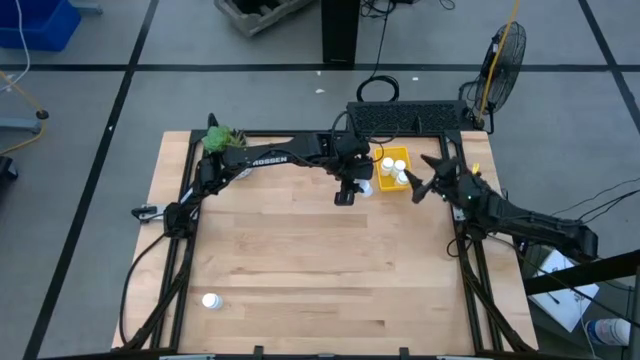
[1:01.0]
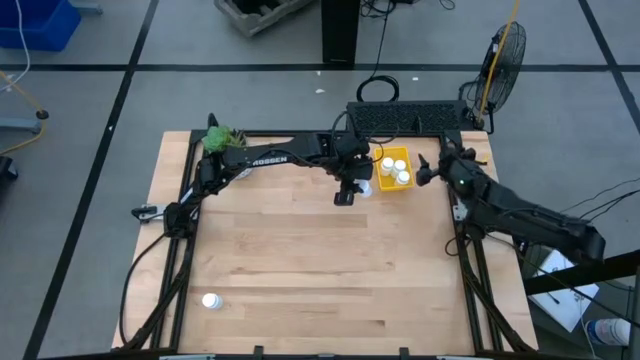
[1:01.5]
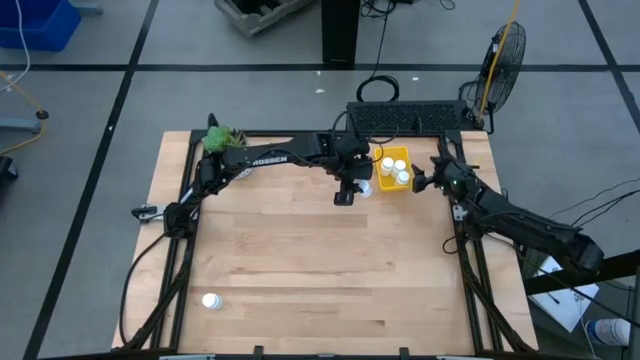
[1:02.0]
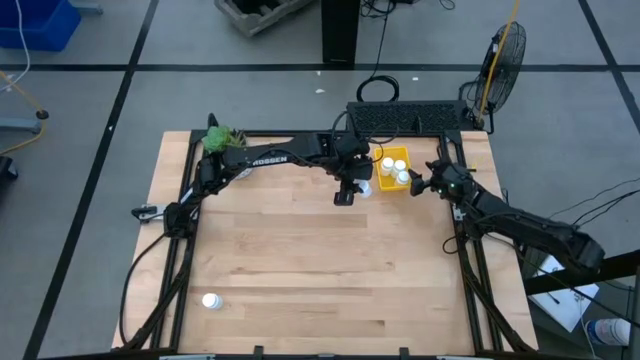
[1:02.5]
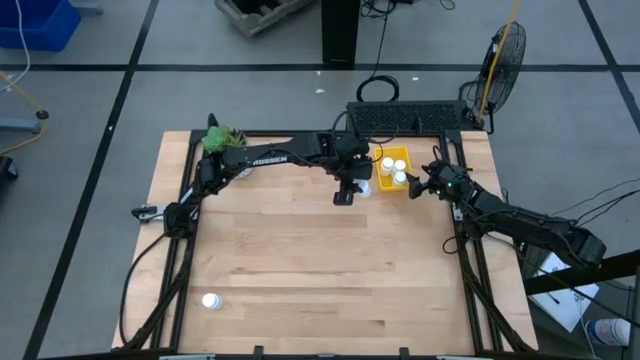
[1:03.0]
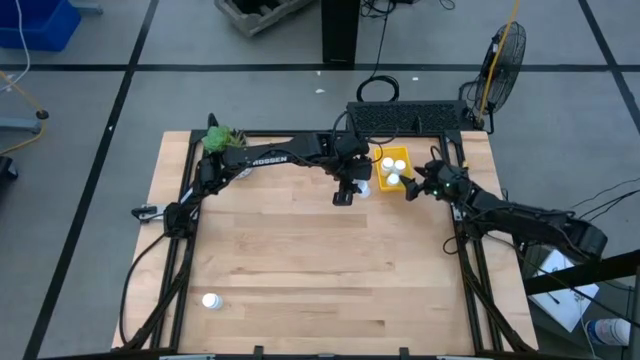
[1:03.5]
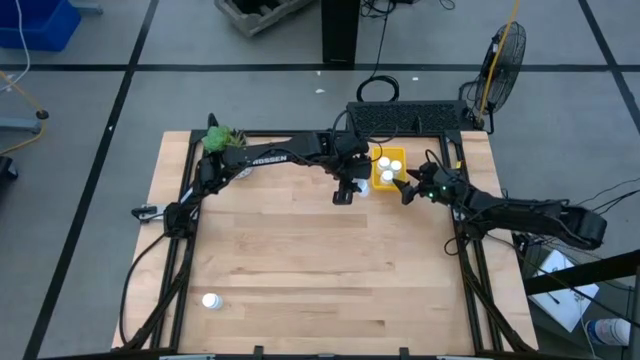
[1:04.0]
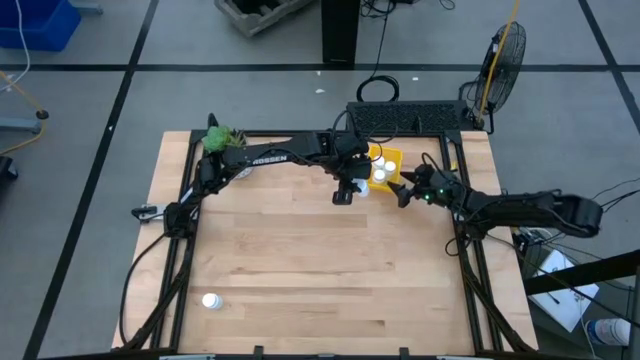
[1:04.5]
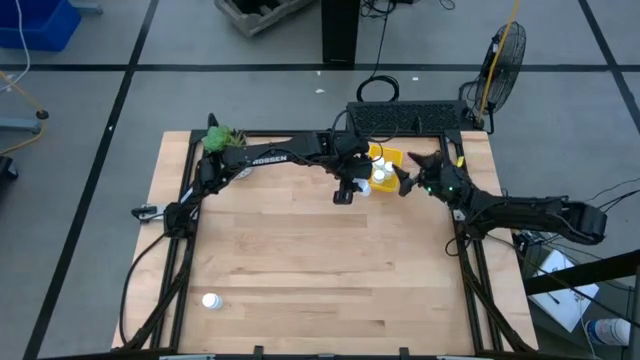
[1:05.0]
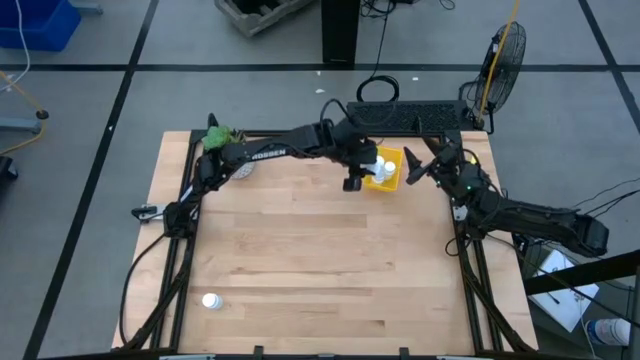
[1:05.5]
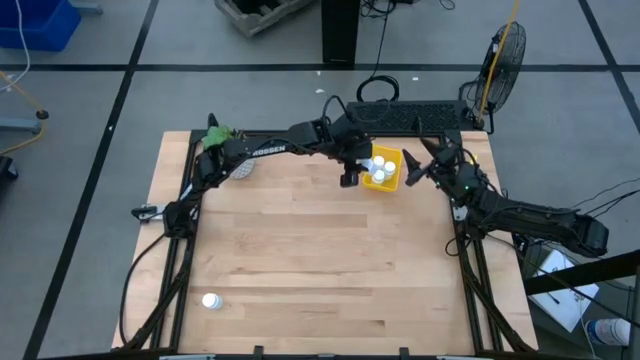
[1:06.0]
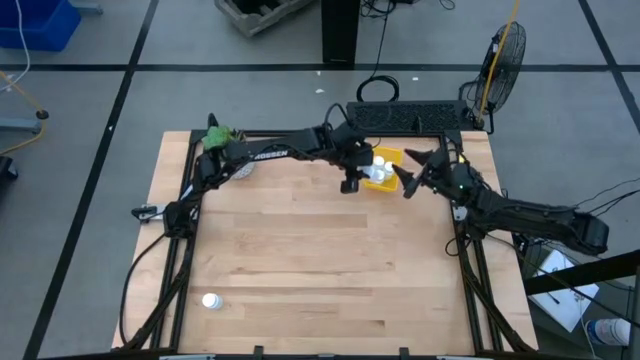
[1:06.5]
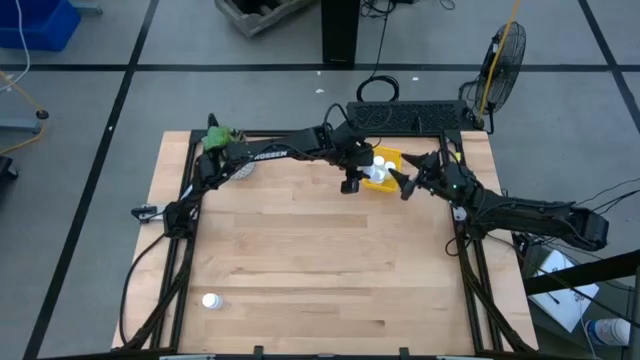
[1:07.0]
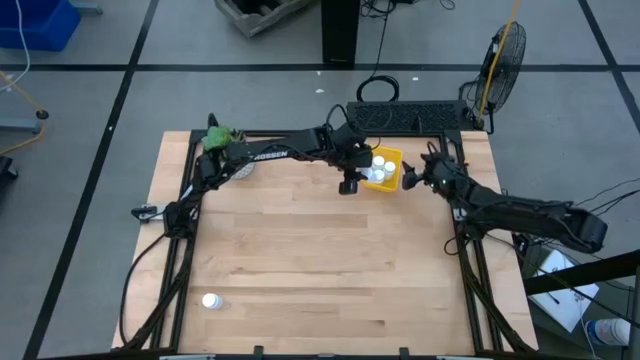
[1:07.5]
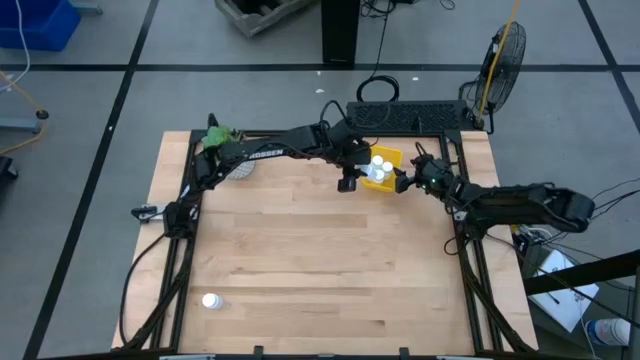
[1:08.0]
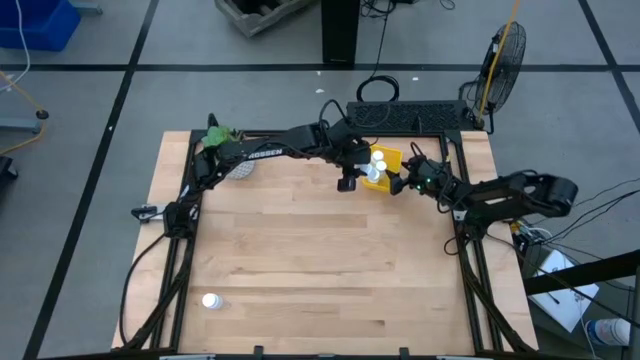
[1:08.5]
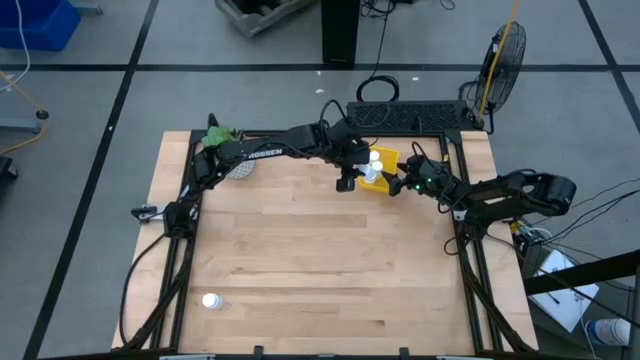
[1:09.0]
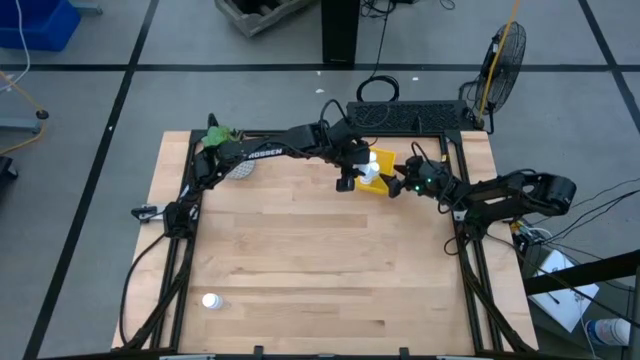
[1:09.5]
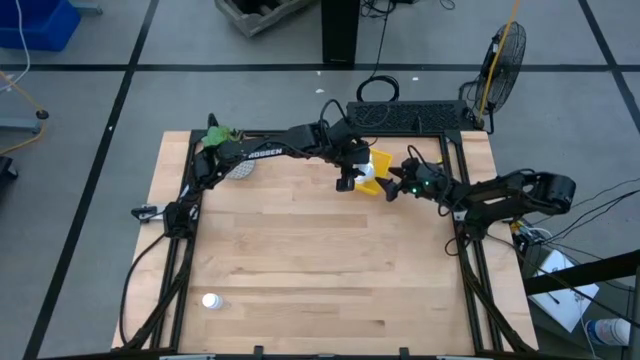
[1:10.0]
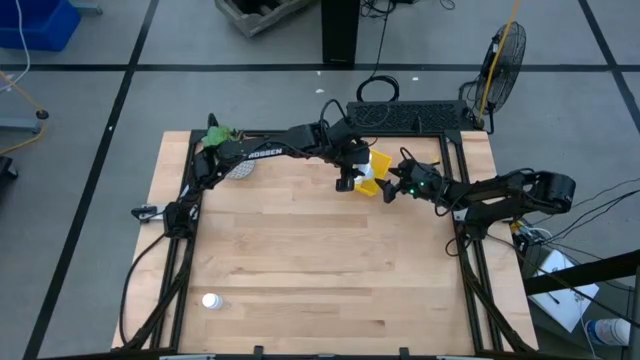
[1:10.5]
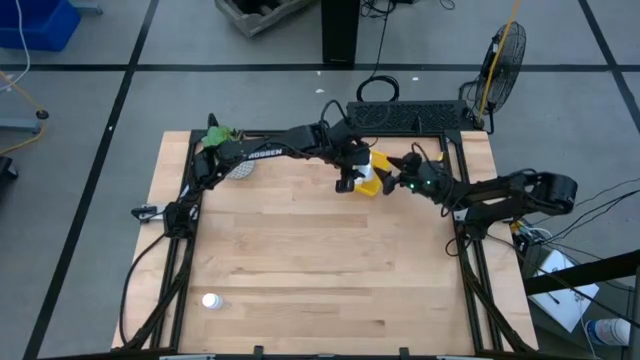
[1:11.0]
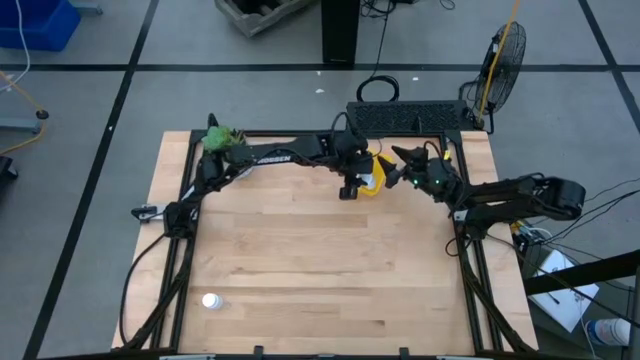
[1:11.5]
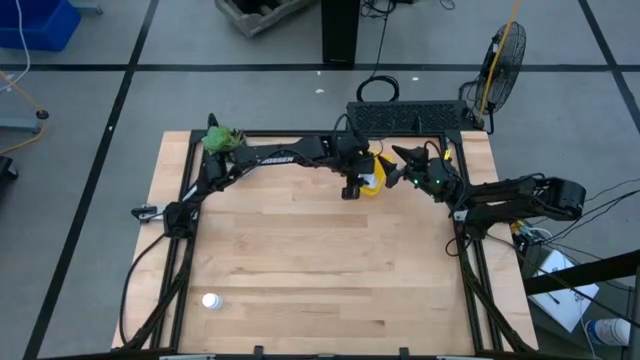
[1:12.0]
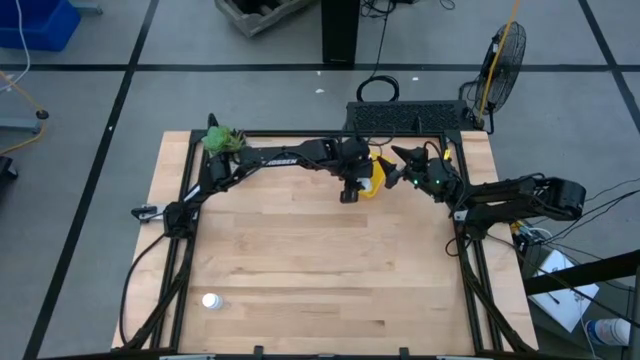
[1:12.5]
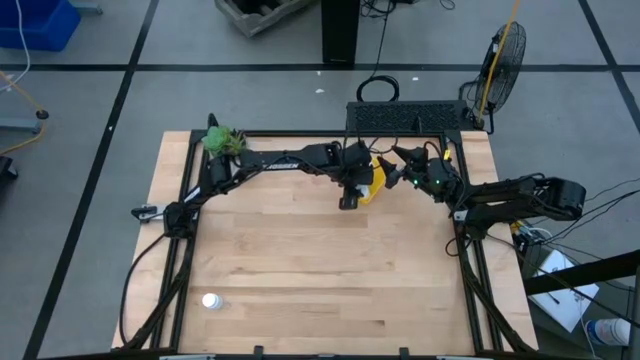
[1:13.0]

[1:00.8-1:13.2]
Task: Pick and place pill bottles into a basket
Put the top white medicine bottle into the yellow bin

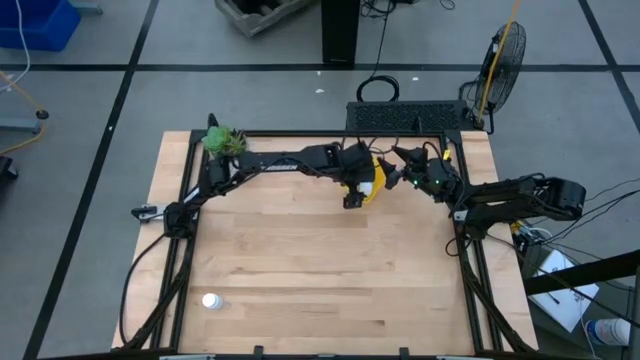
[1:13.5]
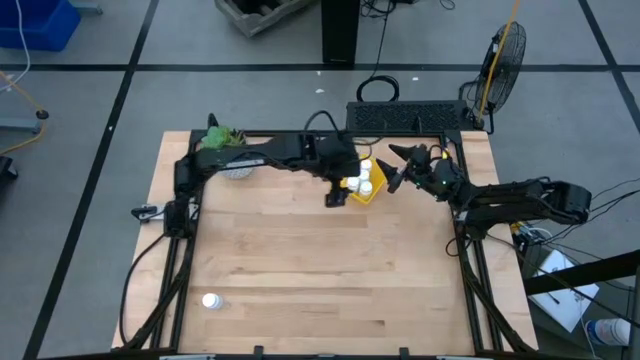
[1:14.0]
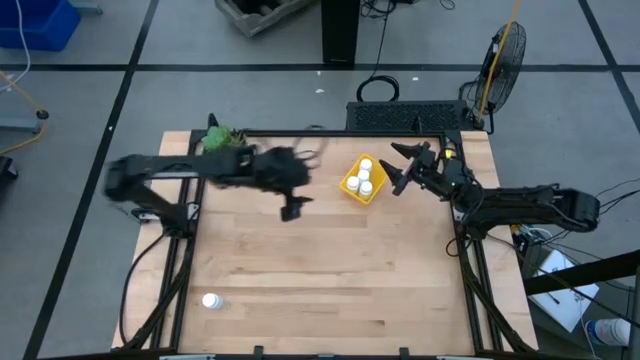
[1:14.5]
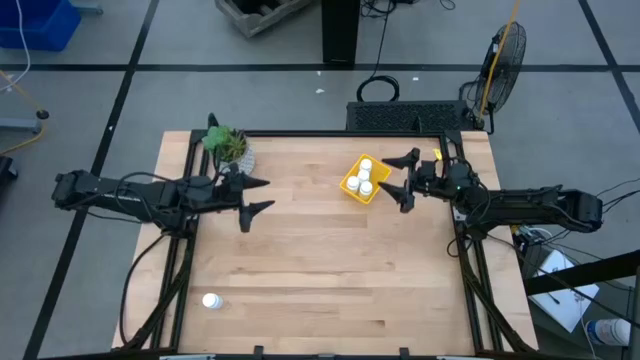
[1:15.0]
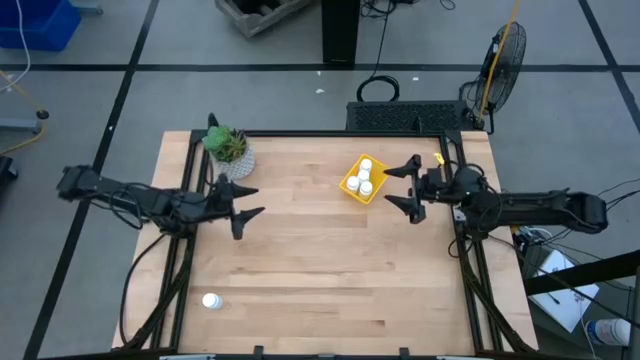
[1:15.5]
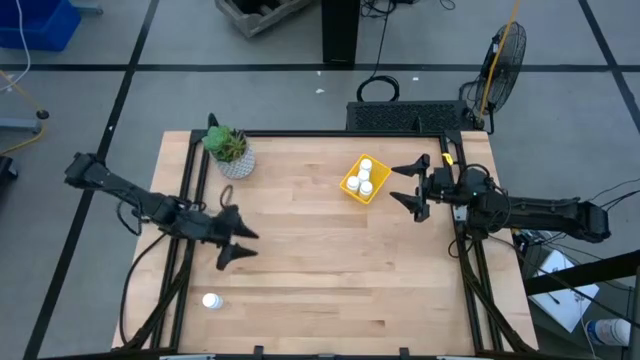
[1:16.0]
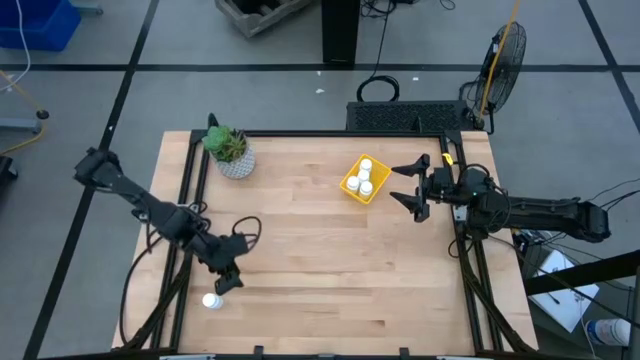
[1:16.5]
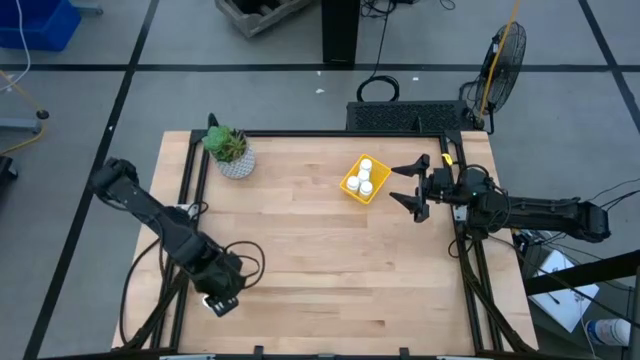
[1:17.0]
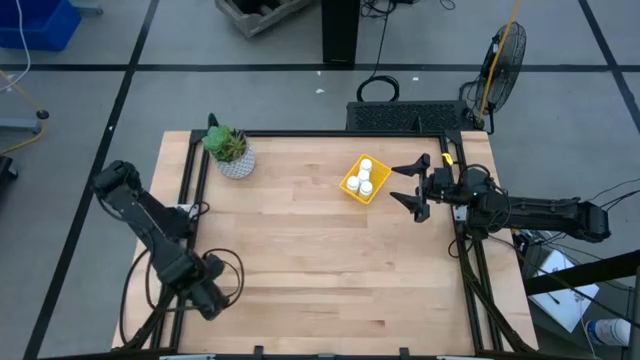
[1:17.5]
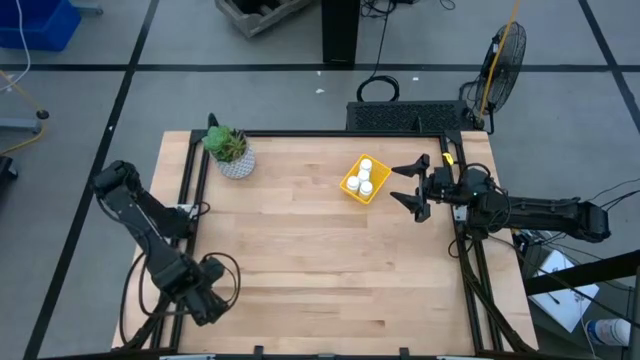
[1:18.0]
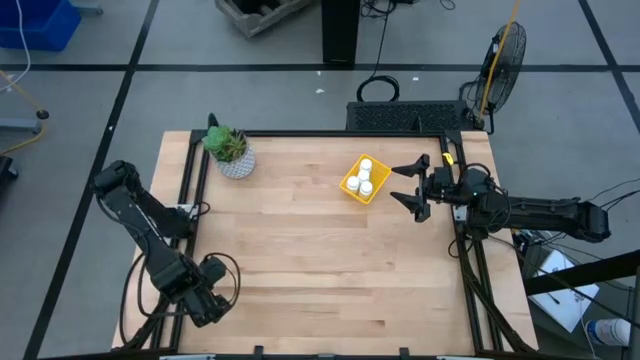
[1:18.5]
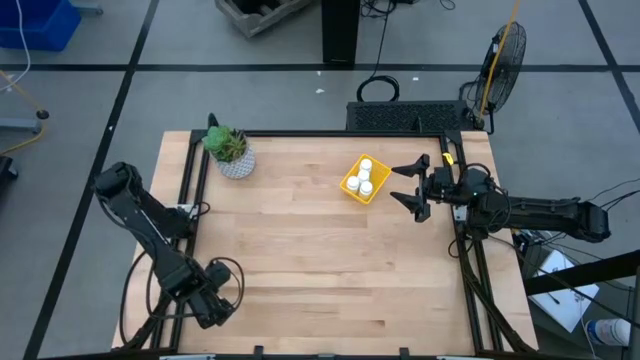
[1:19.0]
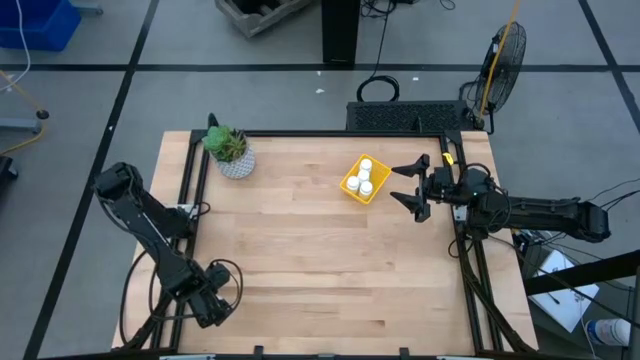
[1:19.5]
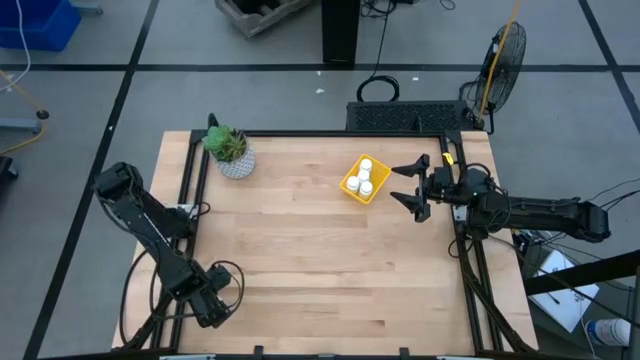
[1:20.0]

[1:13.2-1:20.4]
Put the white medicine bottle into the yellow bin

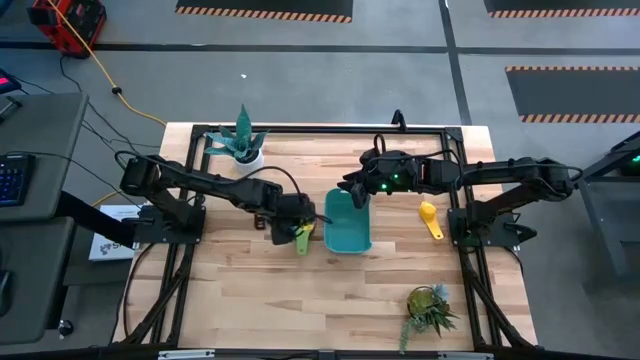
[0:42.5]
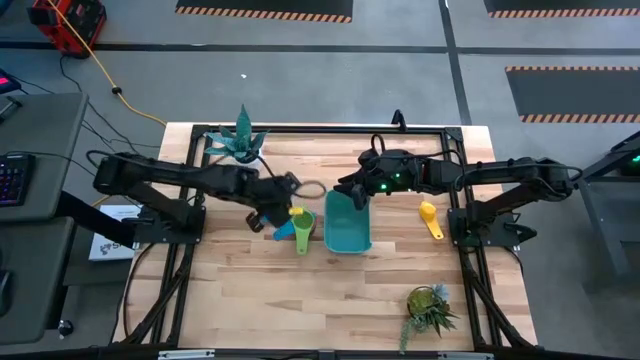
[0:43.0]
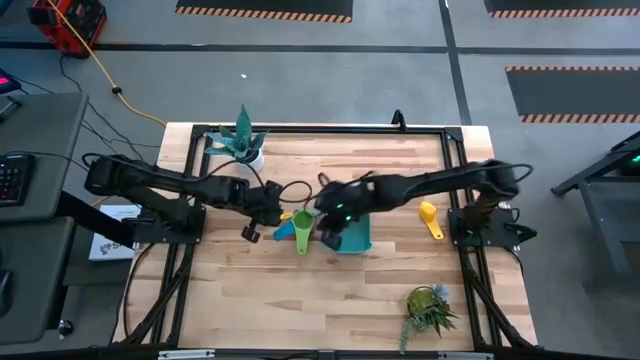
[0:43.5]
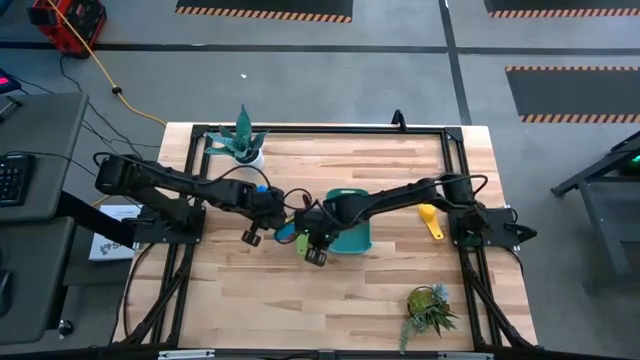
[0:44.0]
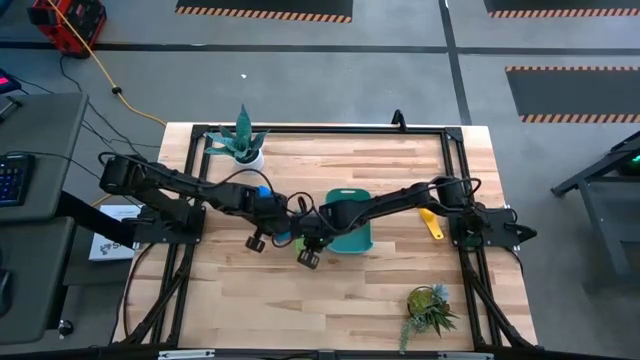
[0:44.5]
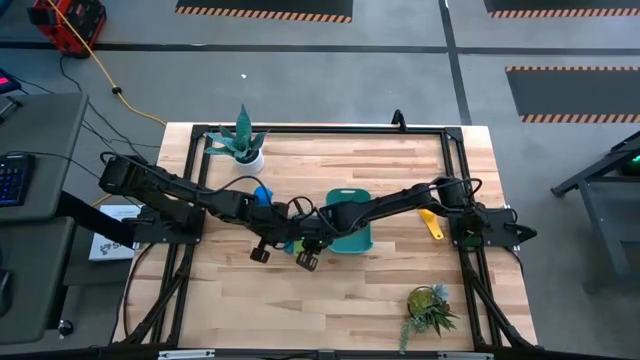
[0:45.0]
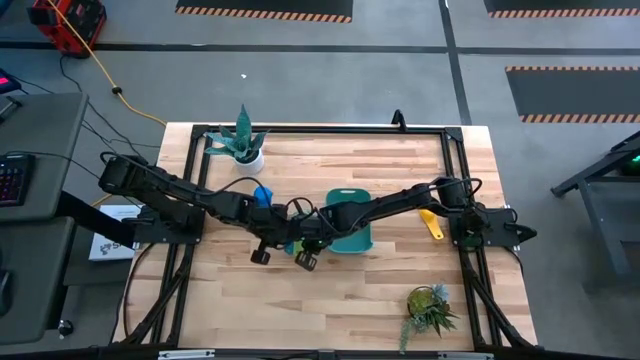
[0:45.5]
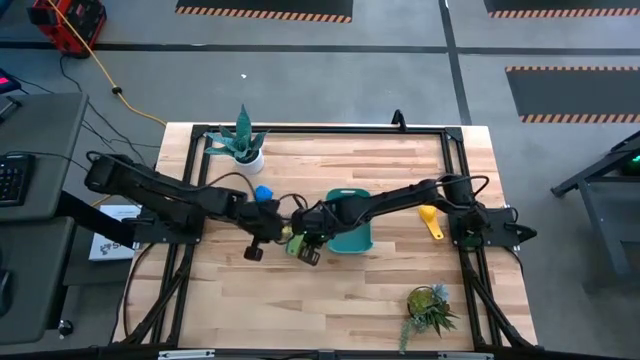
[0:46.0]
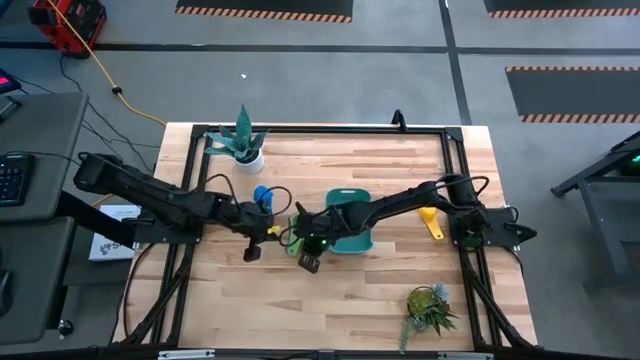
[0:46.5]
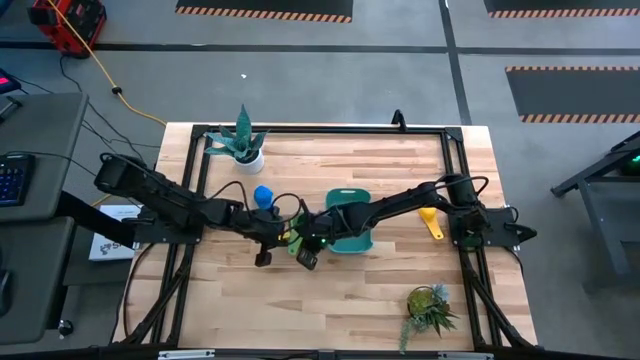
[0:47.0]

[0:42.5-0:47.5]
Task: Nest measuring cups in basket
Adjust the colored stacked measuring cups
